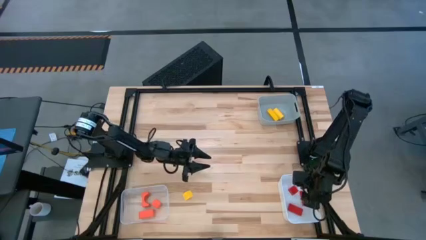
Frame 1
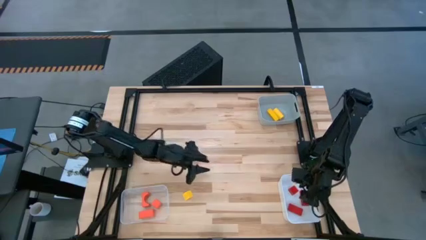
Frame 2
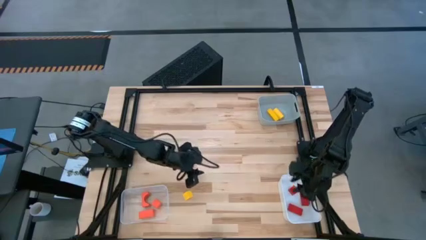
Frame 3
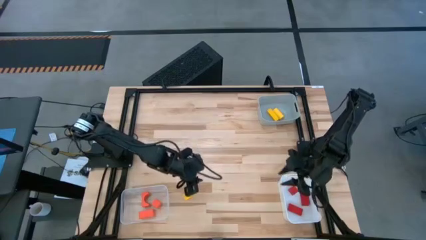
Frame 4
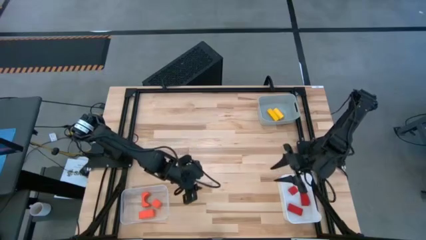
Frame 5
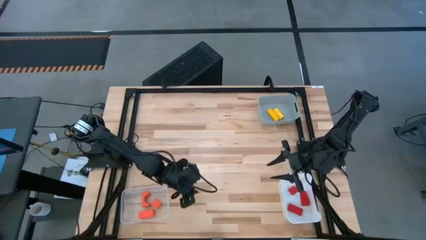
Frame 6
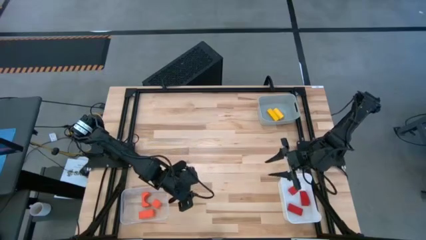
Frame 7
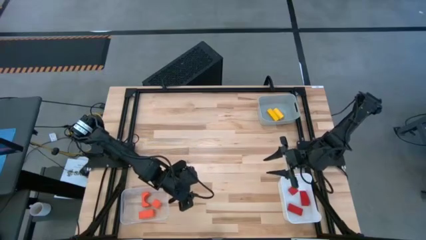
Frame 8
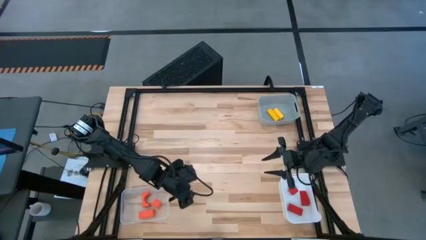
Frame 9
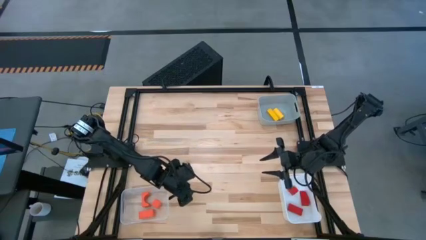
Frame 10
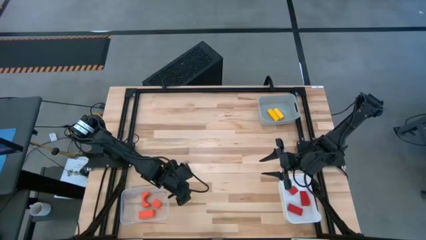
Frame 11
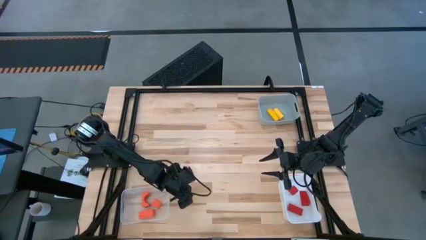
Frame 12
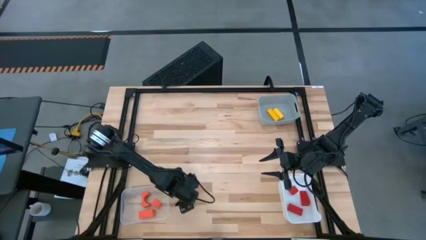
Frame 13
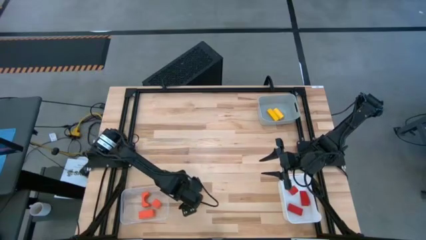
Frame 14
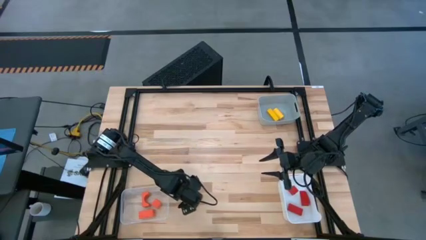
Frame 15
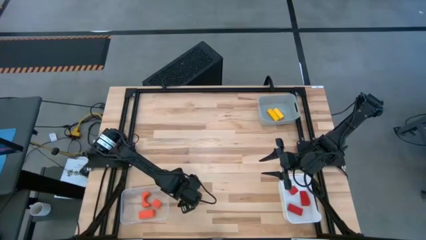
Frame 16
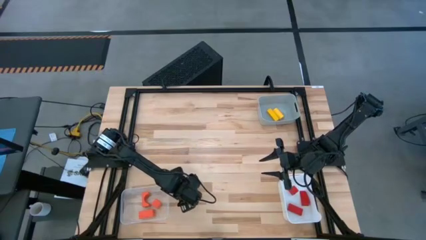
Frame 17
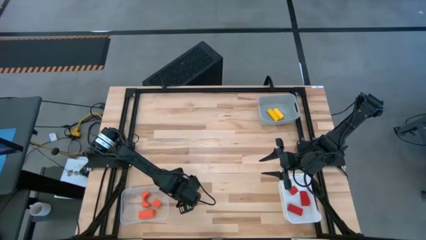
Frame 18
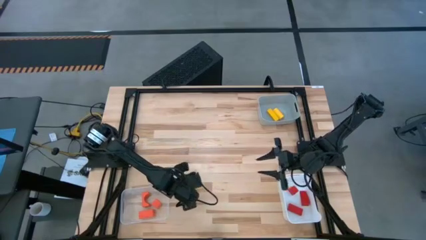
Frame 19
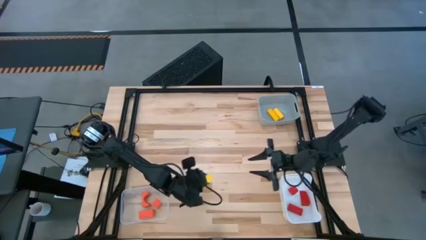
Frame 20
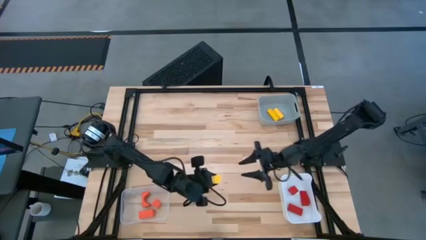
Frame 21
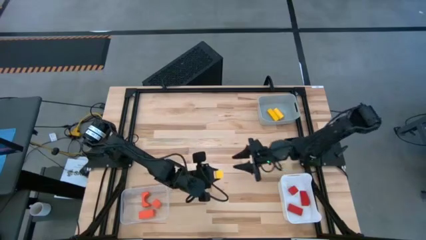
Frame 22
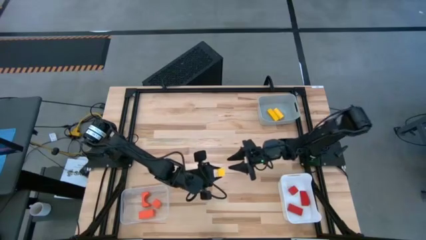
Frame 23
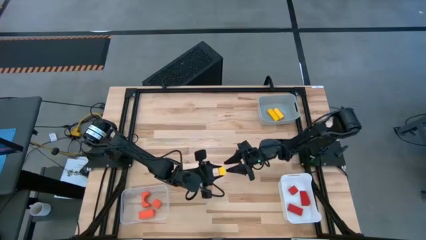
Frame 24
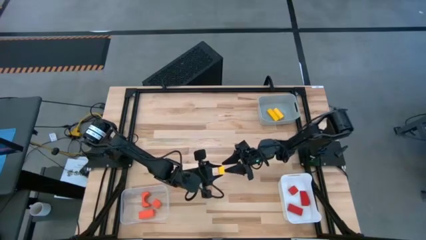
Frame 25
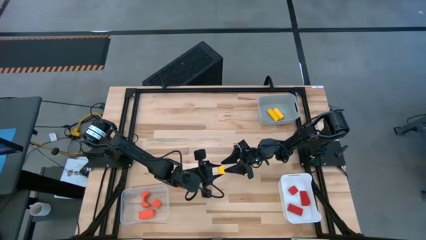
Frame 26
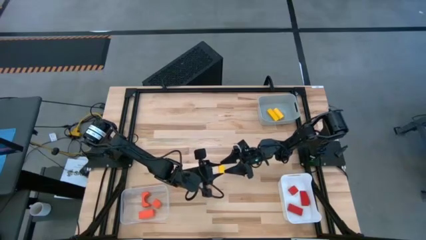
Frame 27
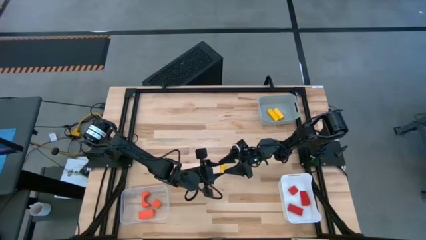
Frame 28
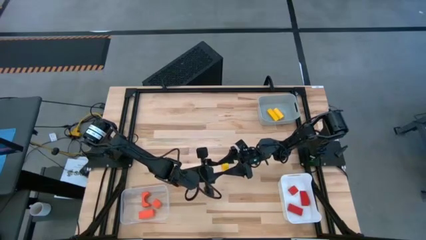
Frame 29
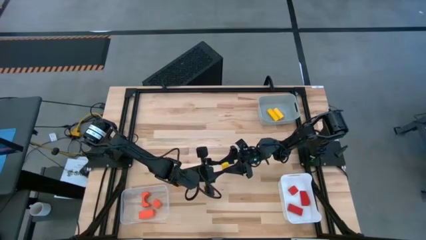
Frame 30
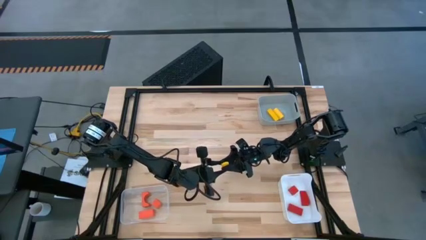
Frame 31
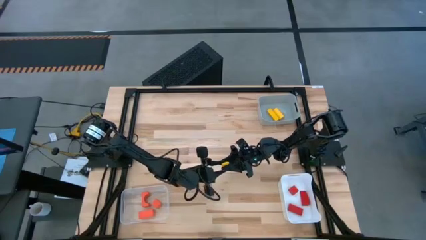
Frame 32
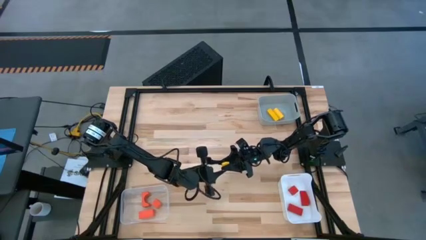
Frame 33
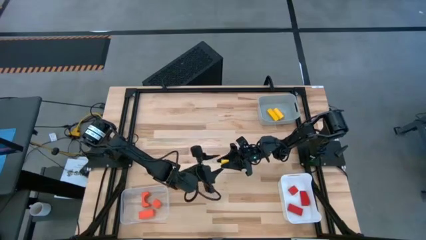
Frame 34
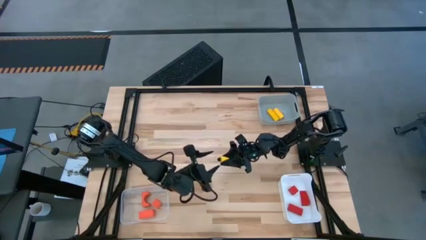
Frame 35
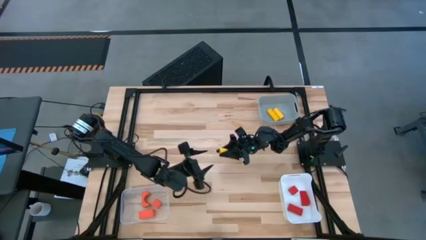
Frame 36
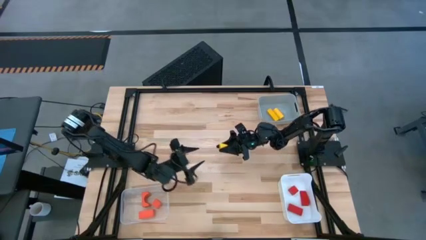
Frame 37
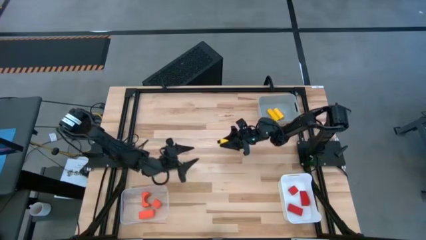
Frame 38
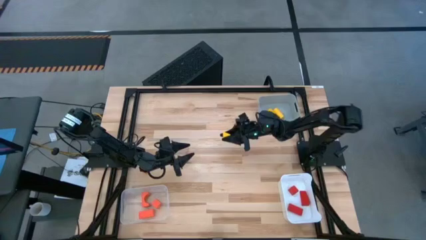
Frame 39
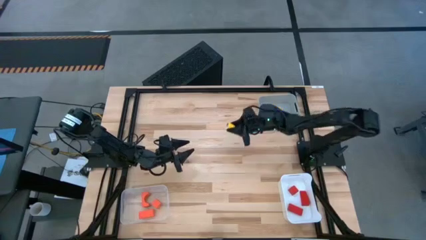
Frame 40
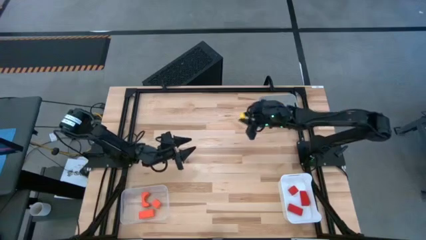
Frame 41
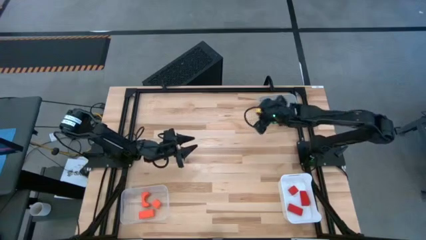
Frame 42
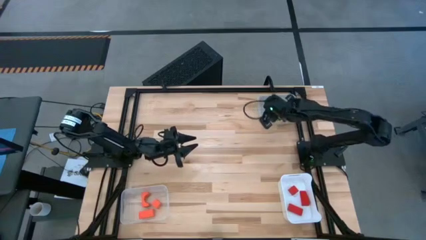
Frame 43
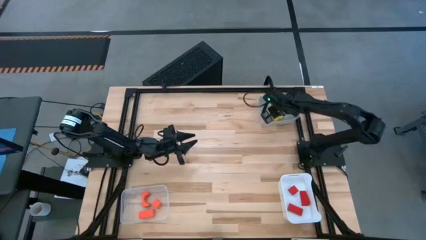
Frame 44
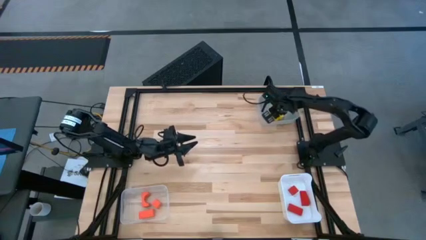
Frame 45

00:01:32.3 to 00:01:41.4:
Task: Sort & place blocks by color
Put the yellow block into the gray bin

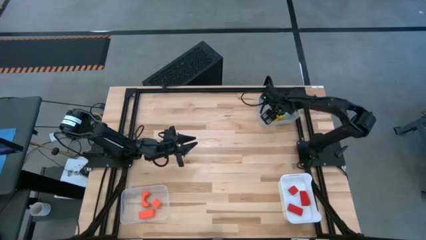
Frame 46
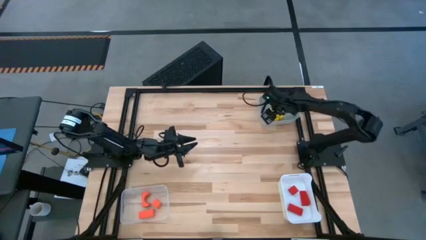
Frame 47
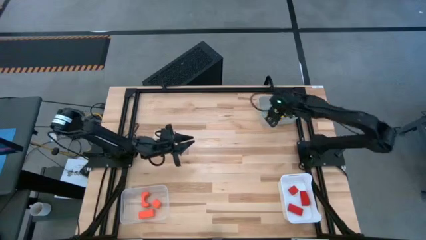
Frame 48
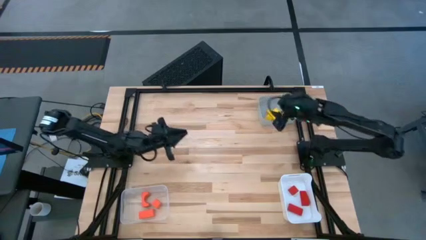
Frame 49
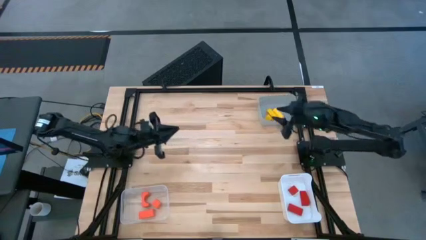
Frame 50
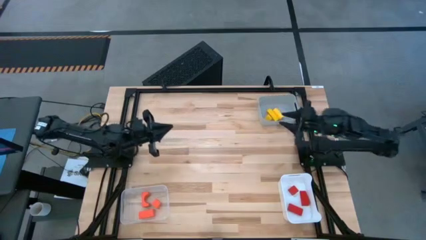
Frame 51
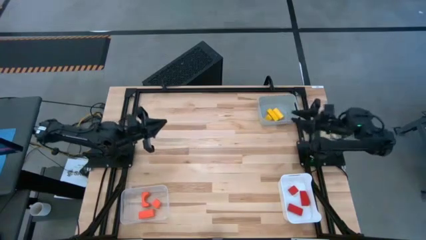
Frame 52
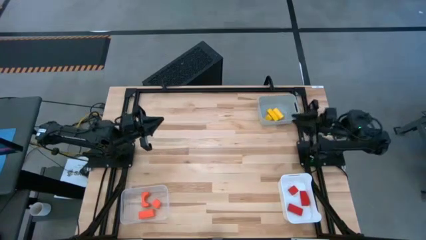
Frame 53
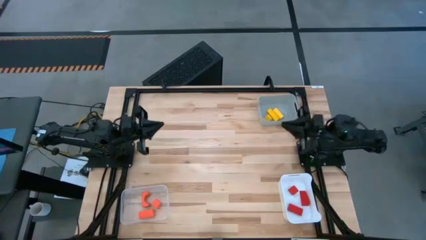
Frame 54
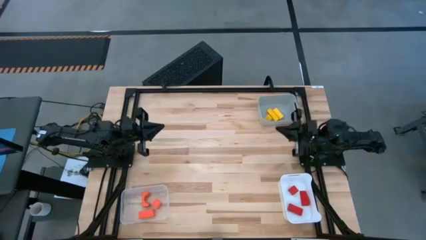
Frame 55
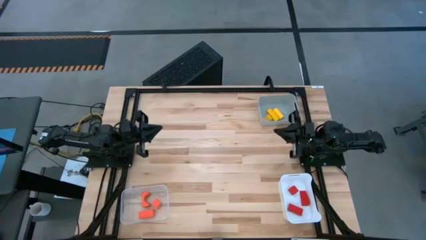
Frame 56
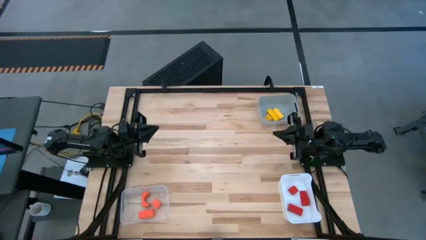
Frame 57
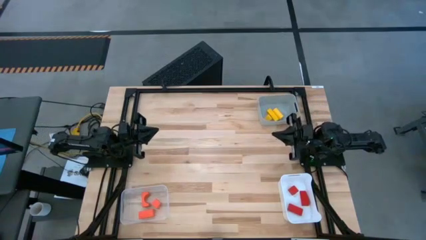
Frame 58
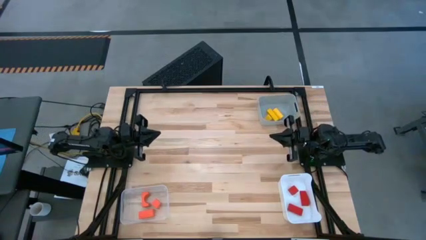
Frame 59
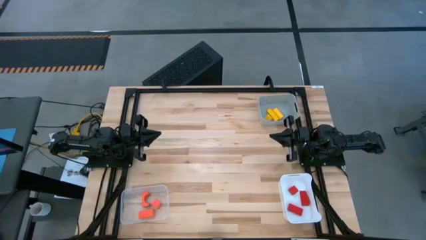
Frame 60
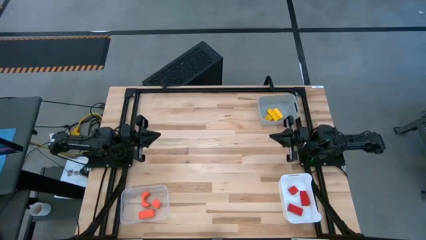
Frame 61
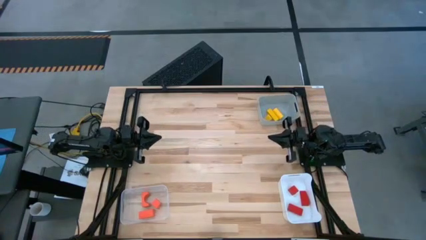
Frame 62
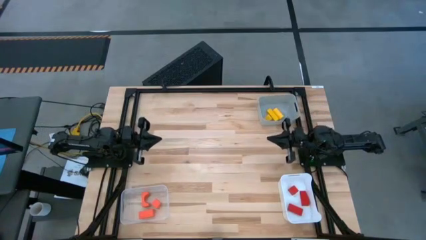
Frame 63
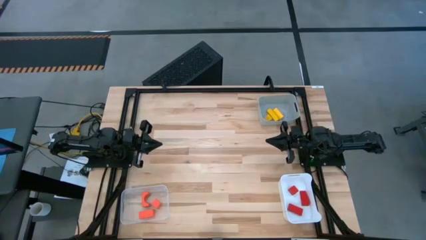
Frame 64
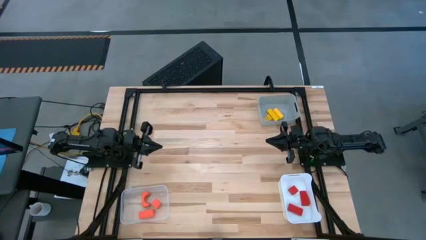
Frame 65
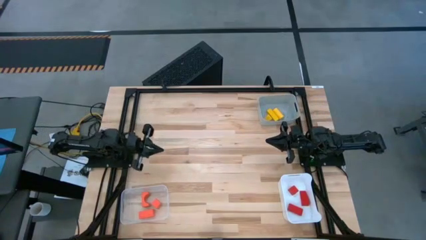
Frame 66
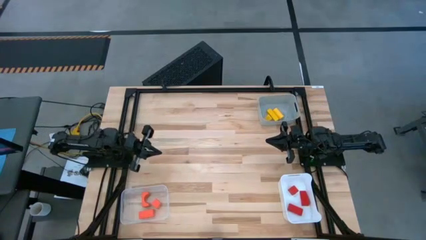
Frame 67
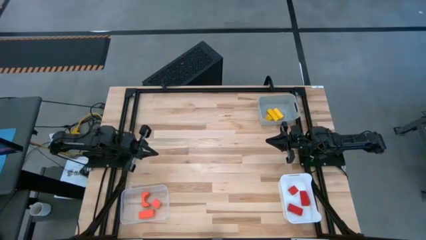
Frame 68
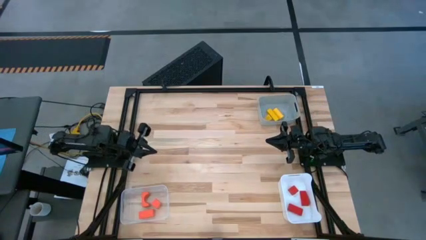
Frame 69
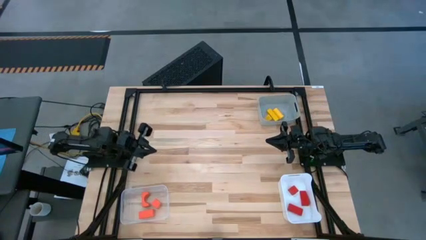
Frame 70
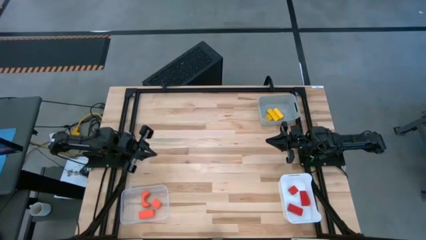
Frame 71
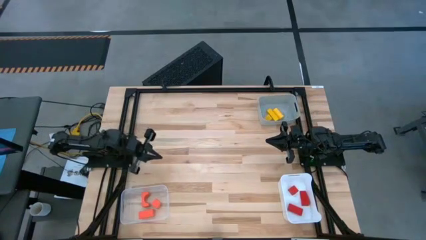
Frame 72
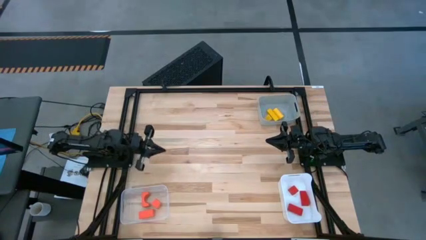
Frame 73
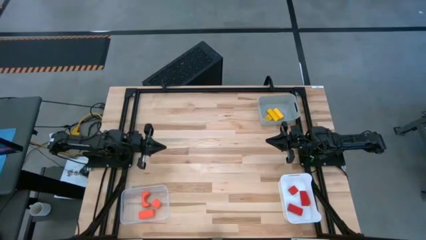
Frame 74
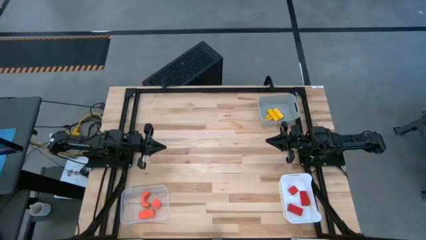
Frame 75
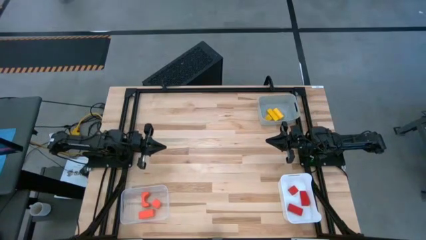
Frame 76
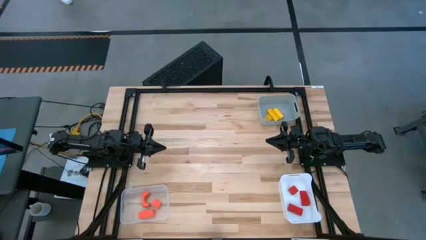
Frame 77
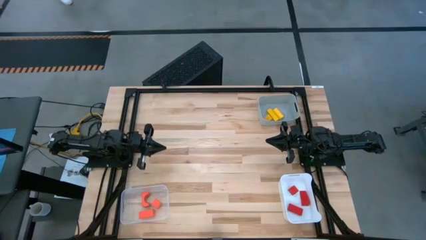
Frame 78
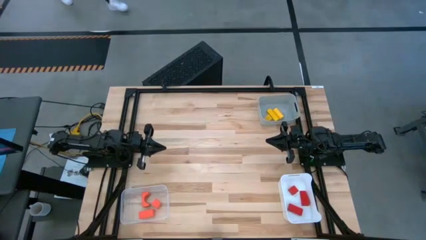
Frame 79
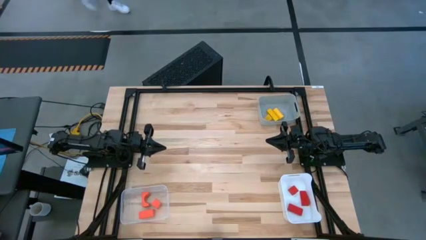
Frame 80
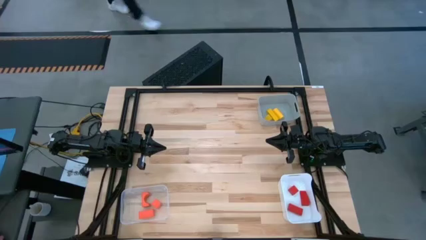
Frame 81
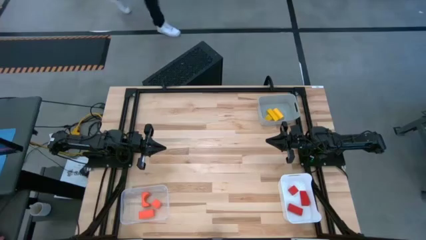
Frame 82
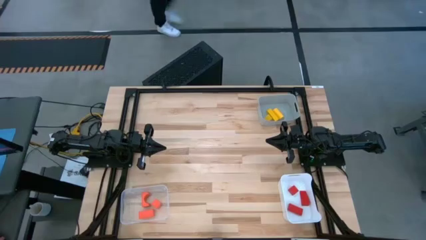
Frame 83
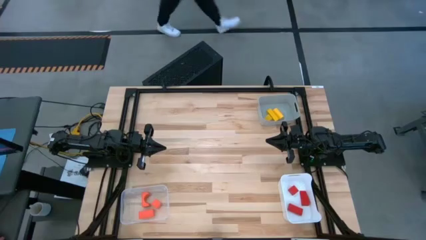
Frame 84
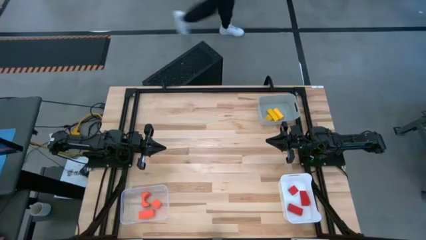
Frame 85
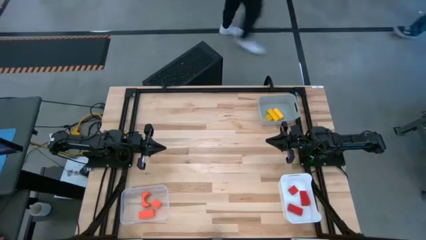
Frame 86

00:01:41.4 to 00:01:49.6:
Return to Home Position
